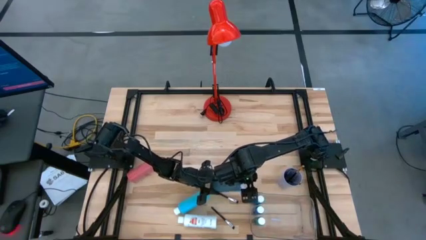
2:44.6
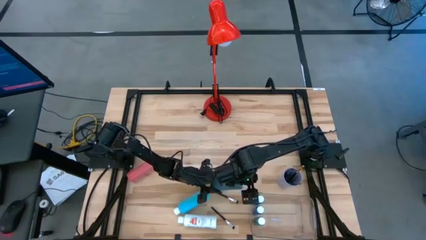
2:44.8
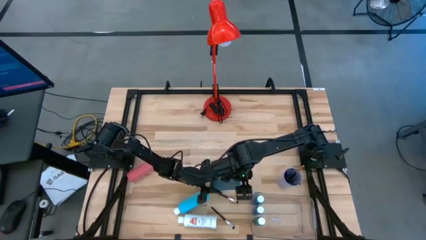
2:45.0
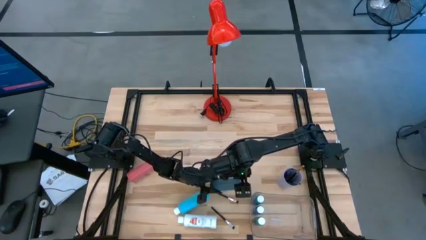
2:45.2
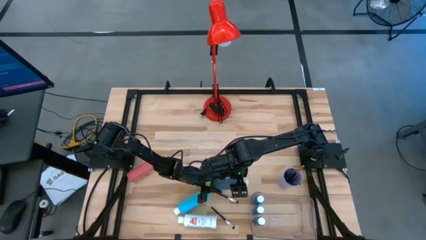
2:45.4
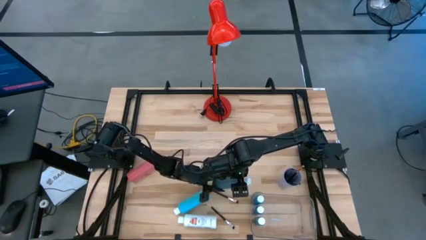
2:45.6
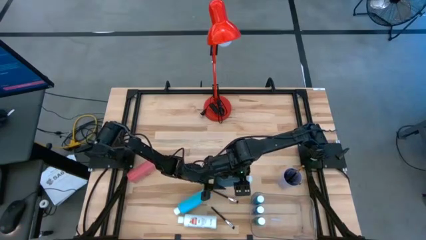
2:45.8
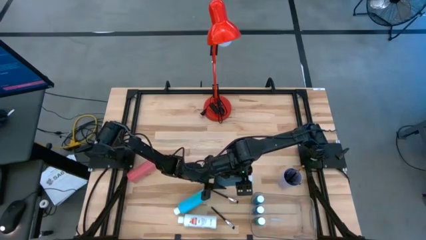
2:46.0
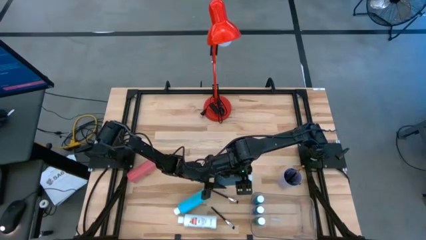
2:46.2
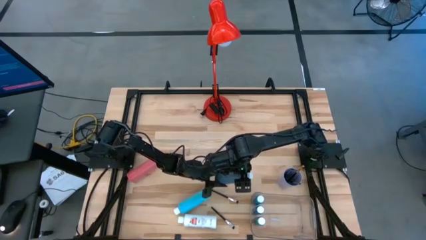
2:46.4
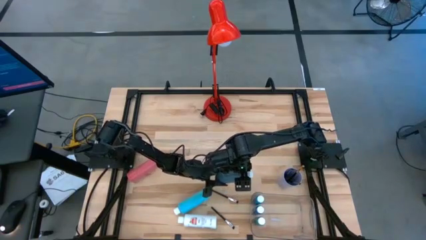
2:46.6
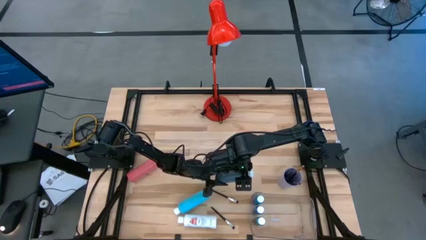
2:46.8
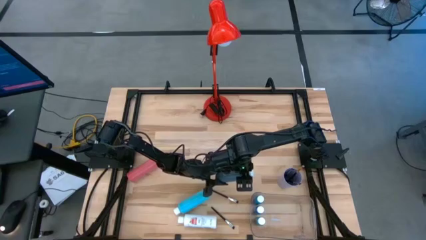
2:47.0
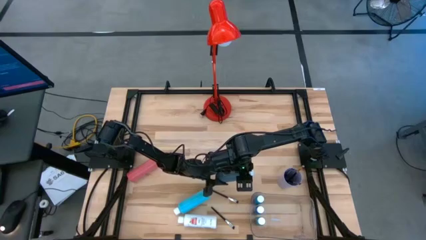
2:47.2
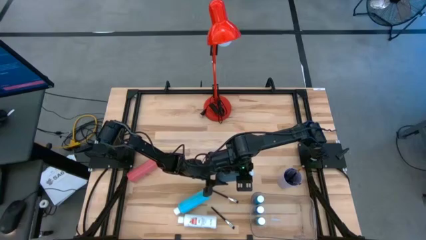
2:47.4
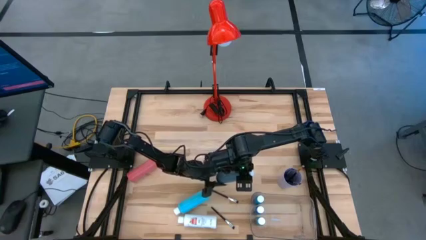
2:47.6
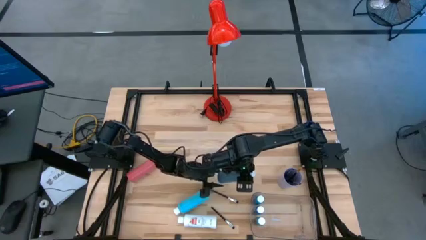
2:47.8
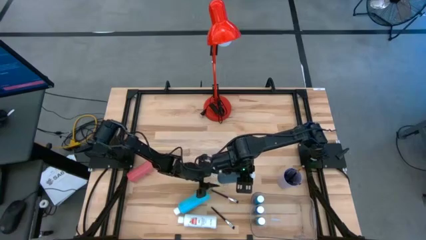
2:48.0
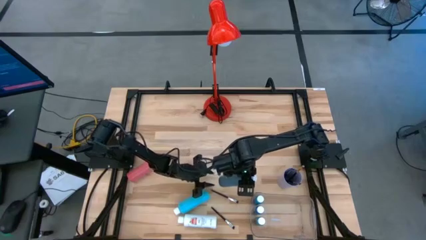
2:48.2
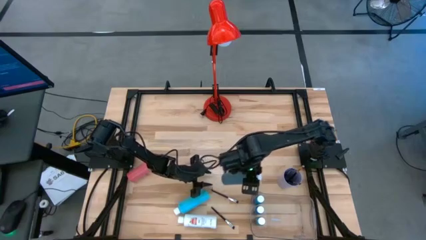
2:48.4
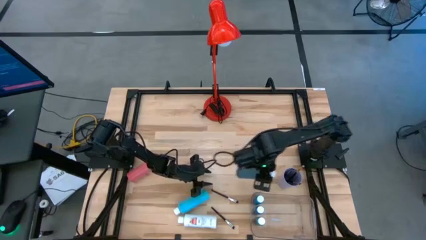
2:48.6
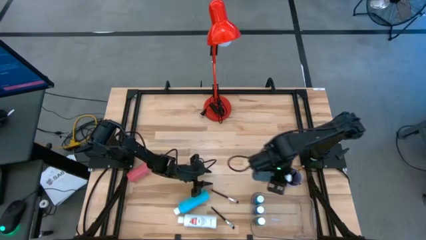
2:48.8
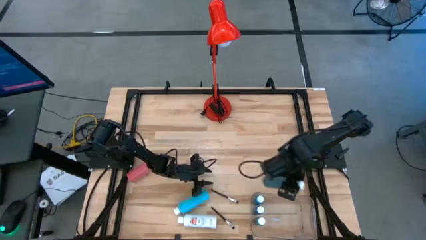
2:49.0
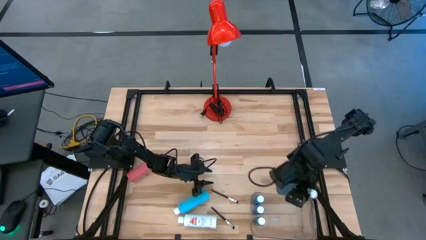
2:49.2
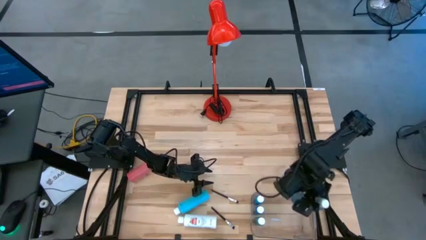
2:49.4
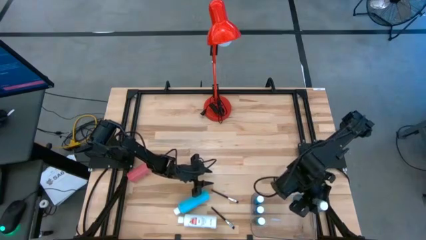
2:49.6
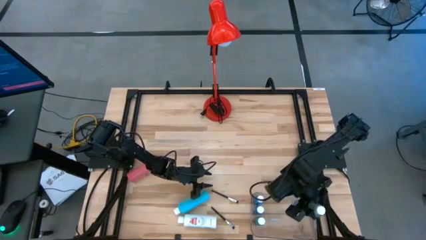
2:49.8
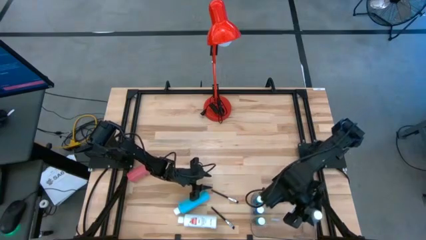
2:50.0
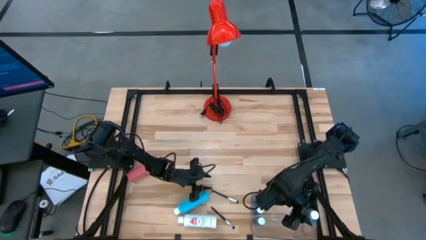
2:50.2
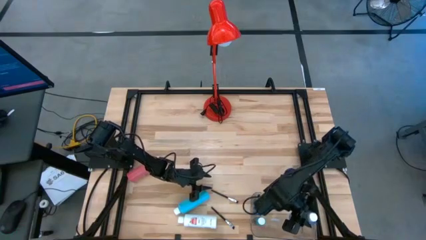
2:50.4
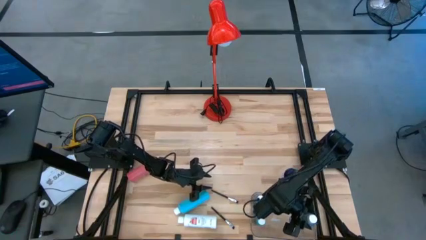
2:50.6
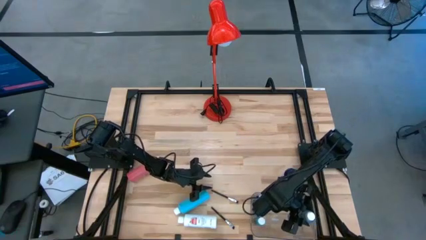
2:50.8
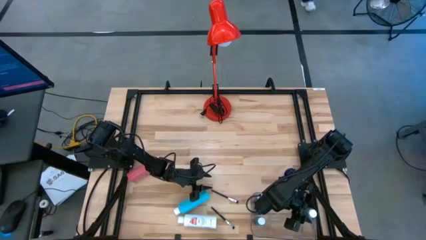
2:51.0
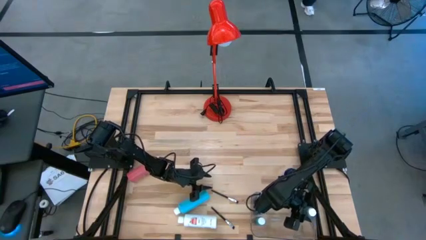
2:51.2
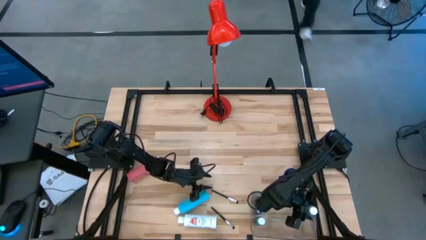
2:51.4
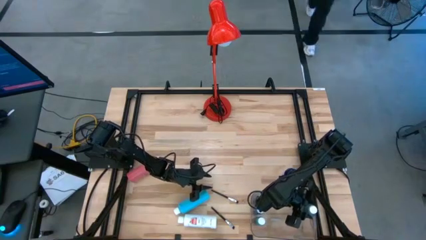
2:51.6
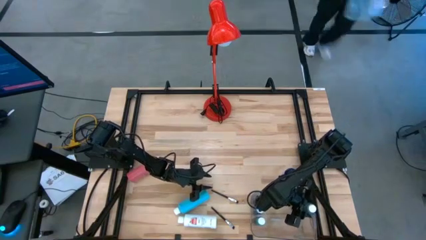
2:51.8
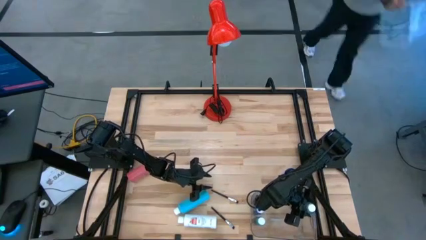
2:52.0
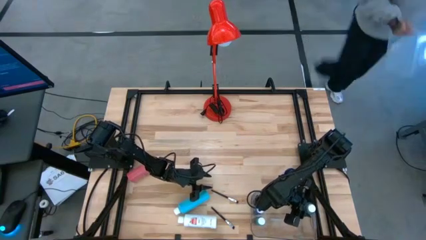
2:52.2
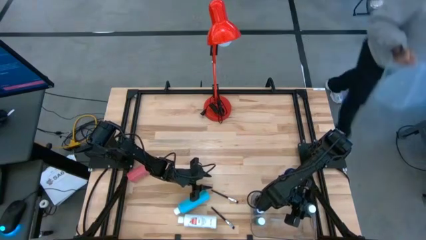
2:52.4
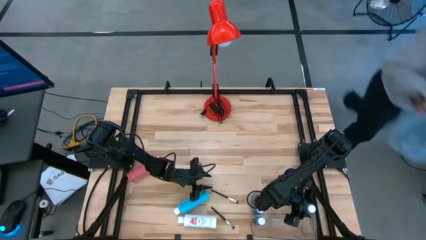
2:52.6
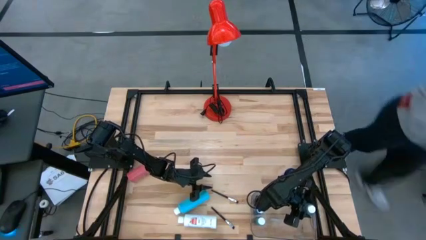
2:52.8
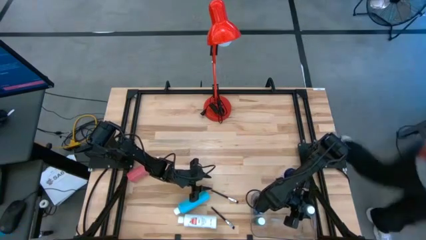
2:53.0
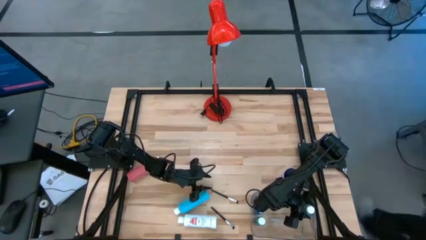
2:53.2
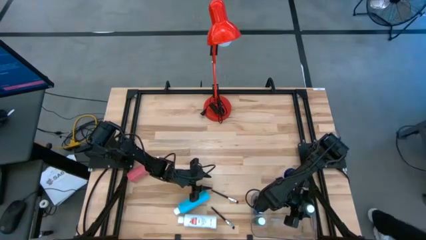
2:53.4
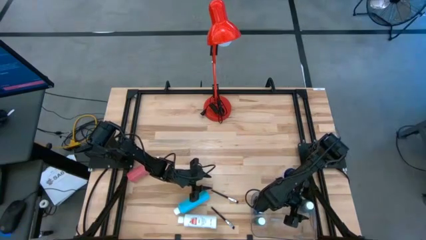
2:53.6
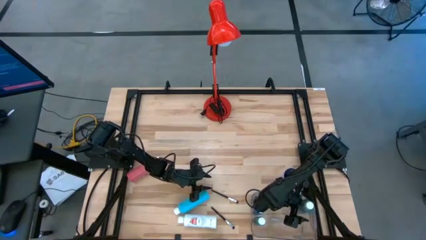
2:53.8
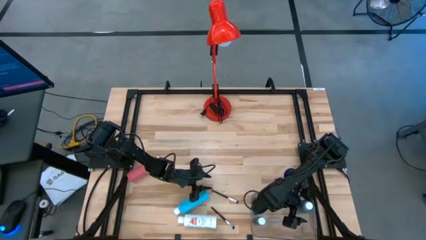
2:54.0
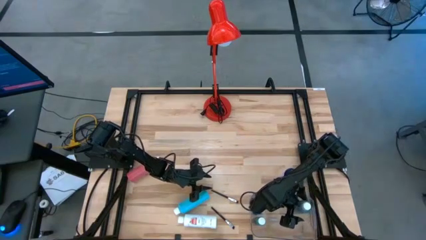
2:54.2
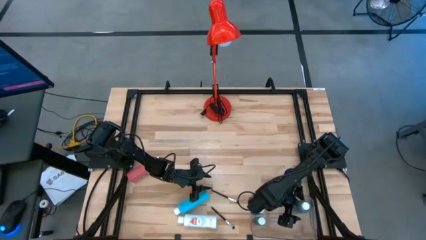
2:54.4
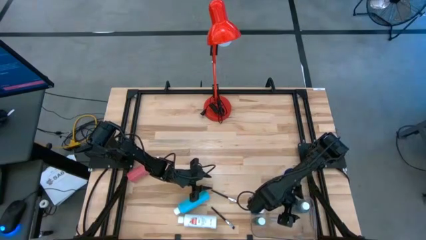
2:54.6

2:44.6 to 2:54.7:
Task: Pick & Place Paint Supplies
Put the black paint bottle into the transparent bin

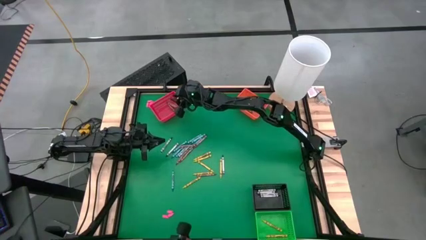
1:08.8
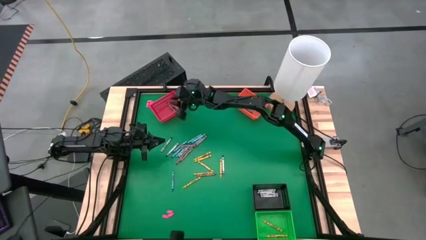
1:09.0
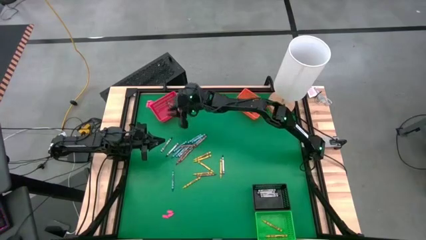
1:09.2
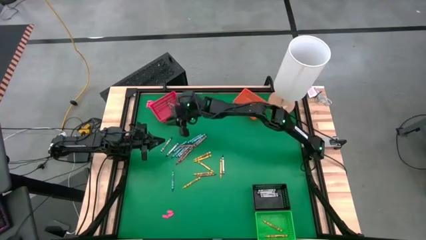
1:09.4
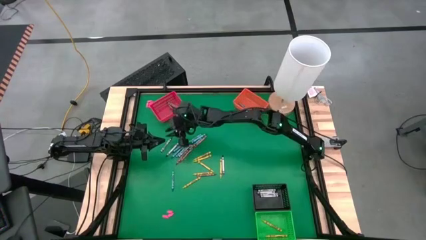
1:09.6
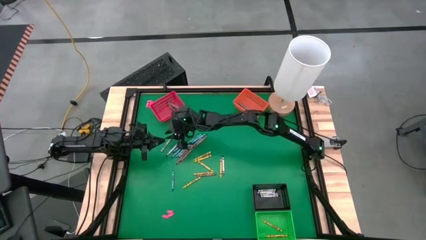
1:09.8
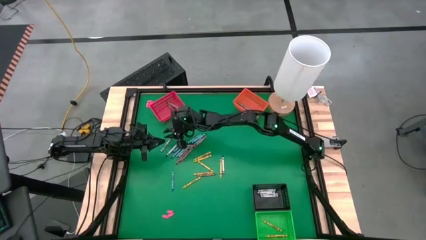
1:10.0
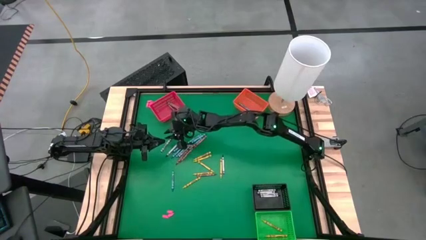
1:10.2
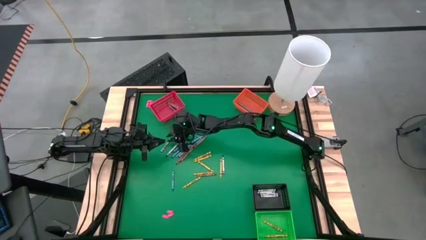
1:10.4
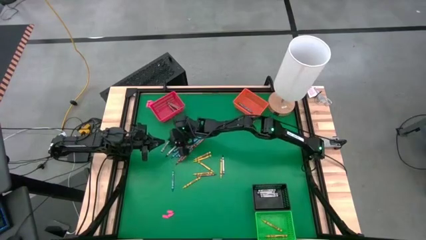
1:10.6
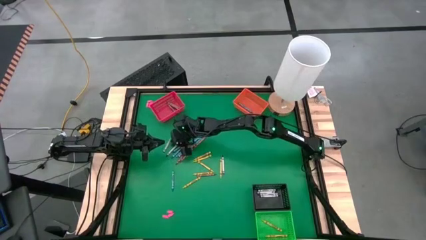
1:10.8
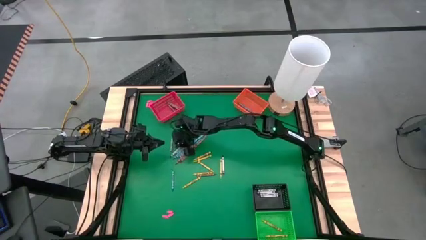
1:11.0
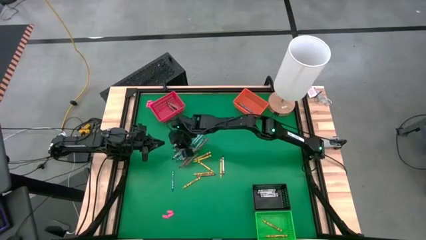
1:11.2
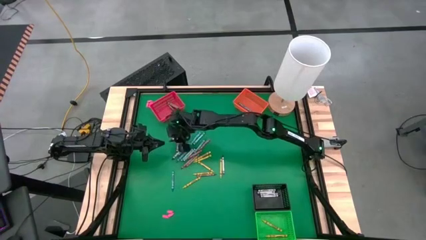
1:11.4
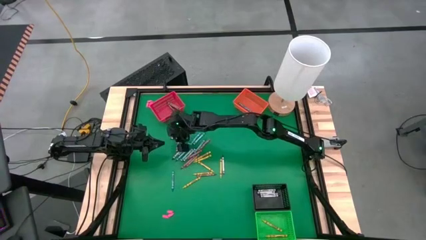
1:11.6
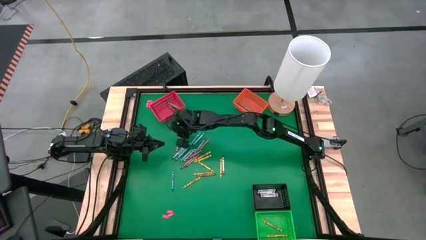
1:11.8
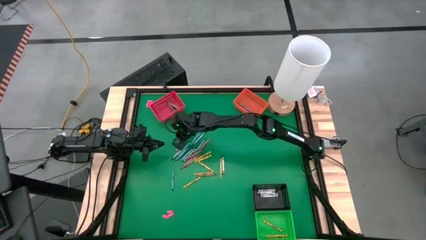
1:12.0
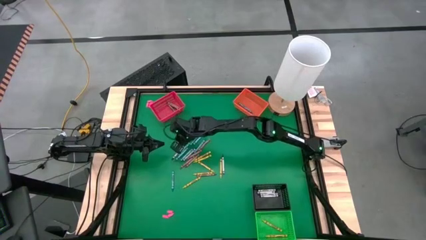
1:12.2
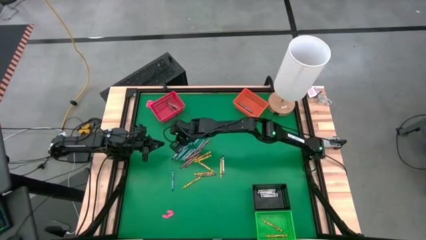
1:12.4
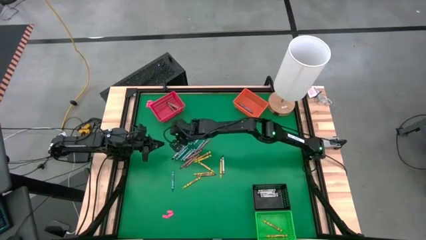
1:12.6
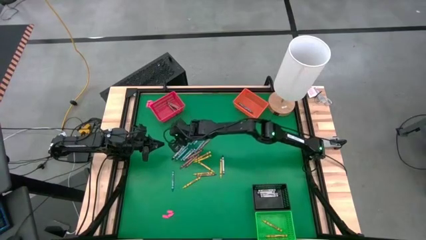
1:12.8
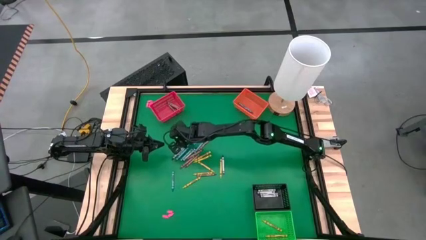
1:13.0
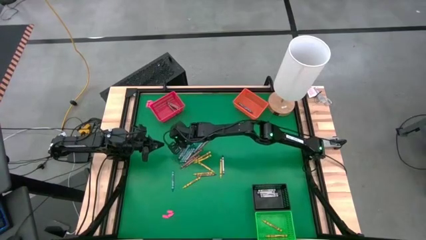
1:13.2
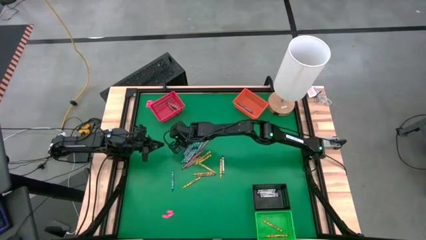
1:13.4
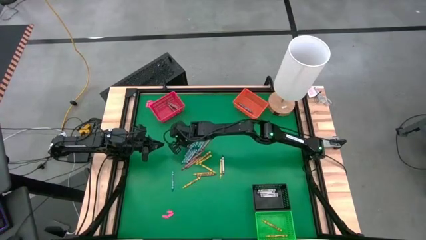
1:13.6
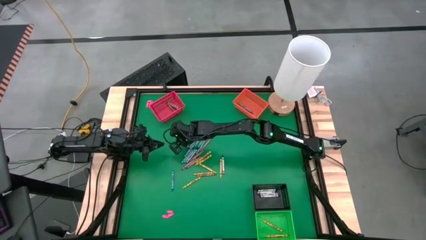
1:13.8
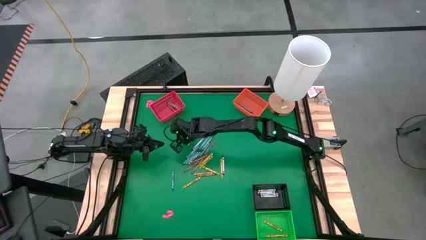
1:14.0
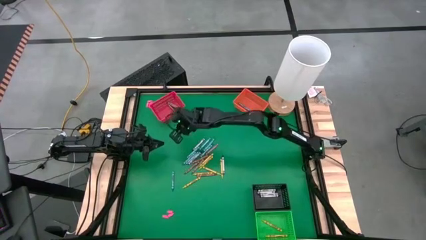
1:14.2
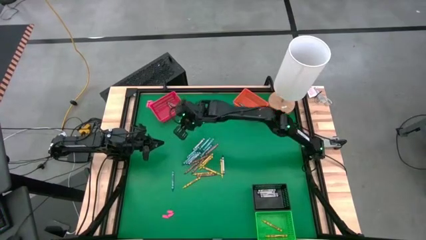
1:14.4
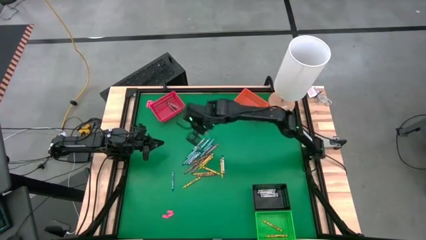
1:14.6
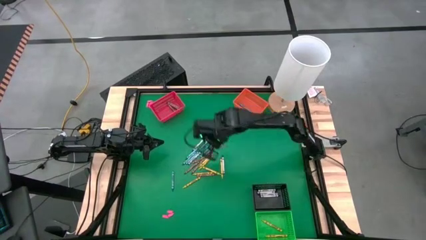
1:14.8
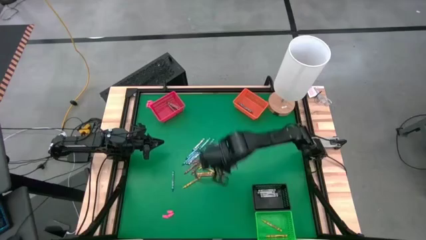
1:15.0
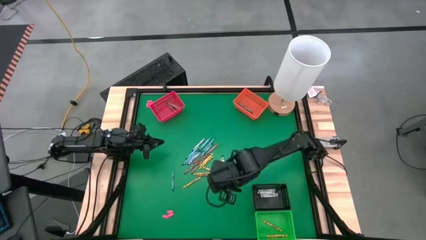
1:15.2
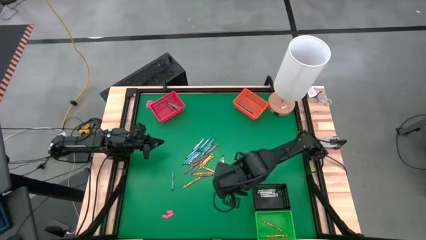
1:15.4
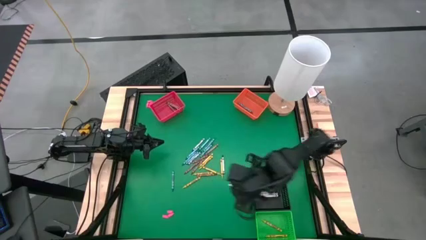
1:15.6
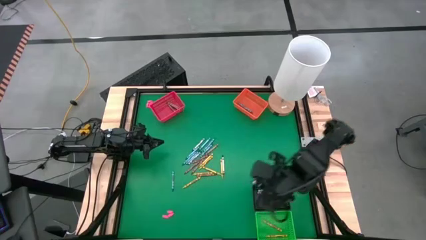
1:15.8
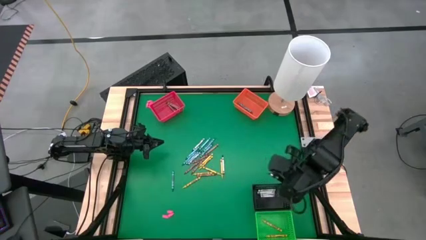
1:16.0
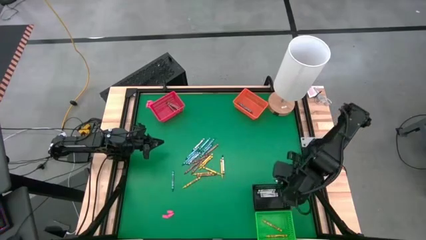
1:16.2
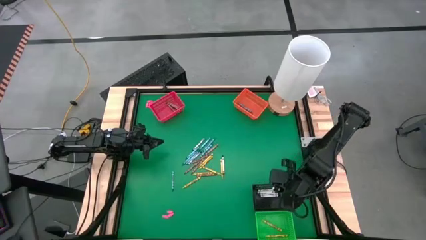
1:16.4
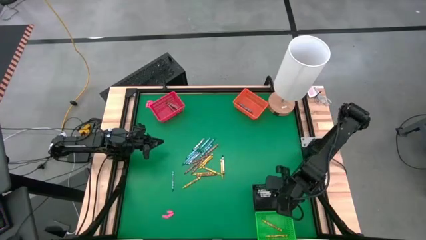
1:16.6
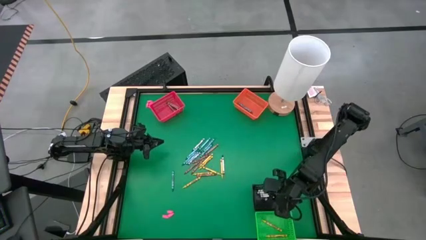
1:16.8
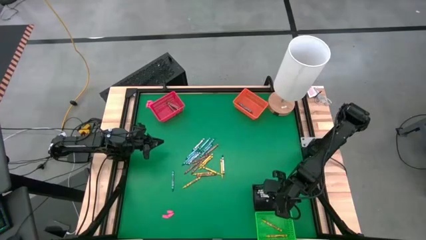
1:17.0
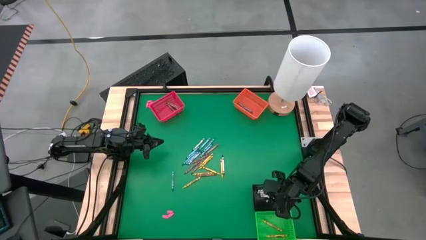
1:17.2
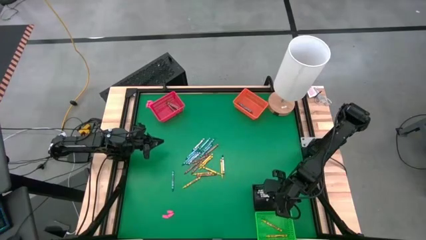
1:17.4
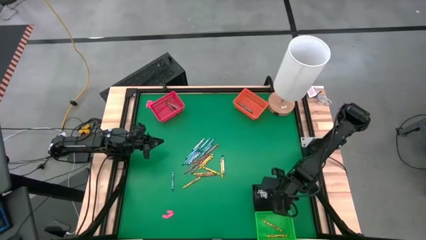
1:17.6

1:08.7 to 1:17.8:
Task: Sort crayons
Put the black crayon into the black bin
